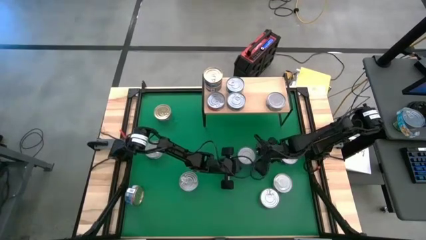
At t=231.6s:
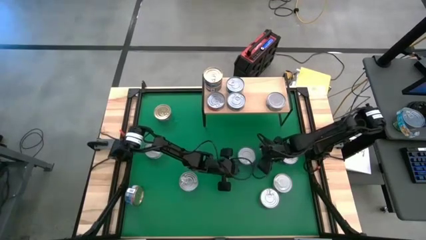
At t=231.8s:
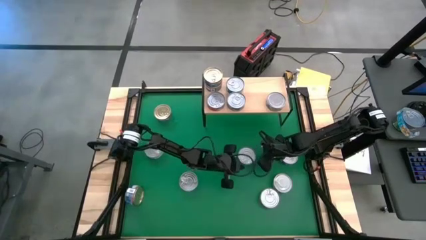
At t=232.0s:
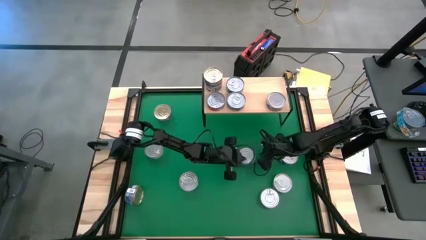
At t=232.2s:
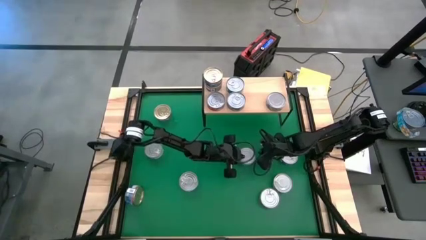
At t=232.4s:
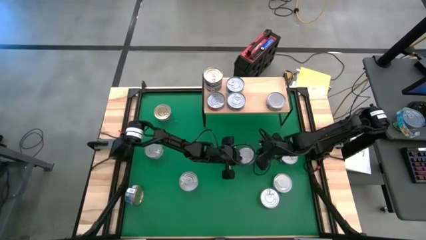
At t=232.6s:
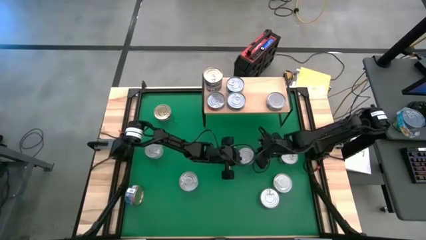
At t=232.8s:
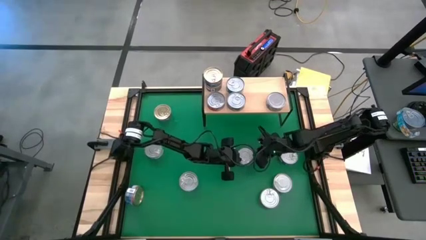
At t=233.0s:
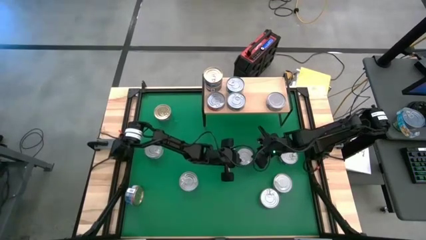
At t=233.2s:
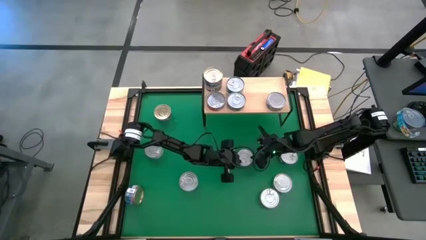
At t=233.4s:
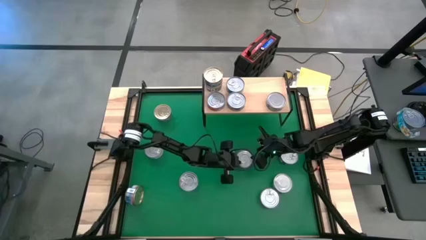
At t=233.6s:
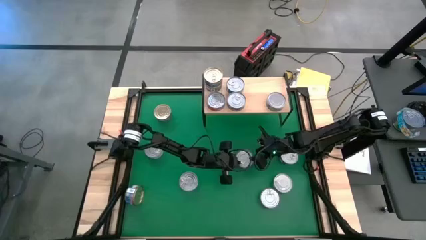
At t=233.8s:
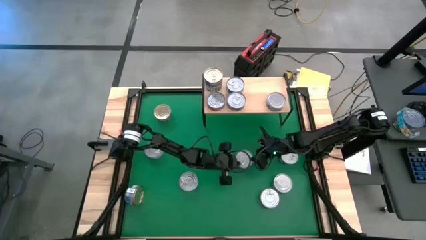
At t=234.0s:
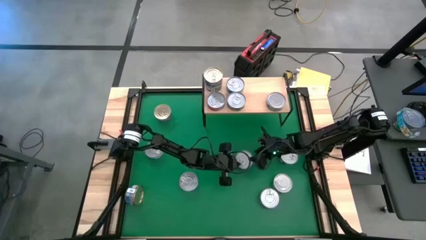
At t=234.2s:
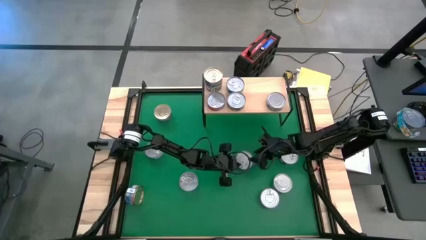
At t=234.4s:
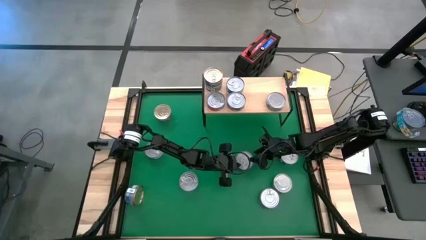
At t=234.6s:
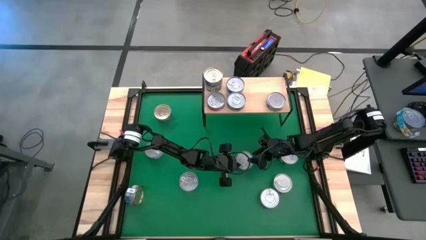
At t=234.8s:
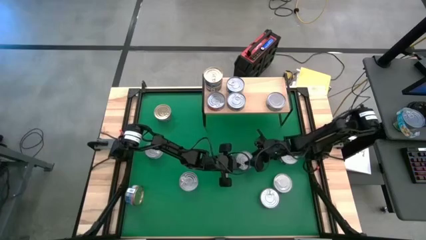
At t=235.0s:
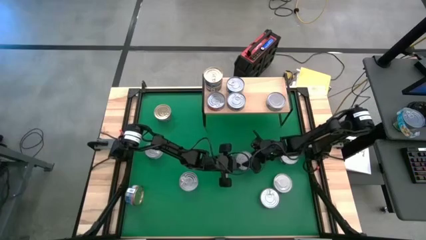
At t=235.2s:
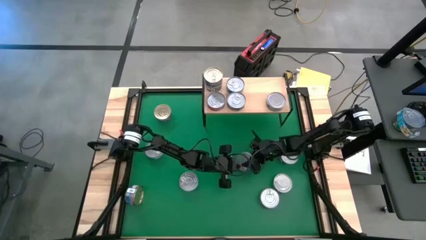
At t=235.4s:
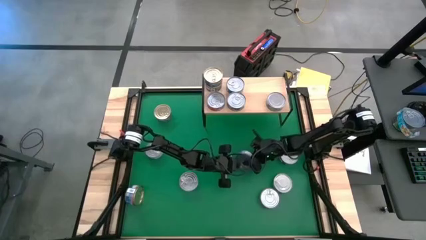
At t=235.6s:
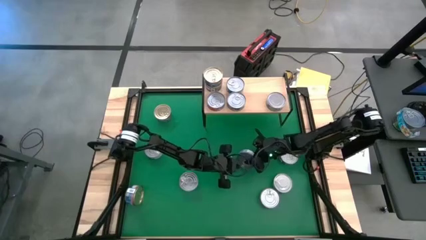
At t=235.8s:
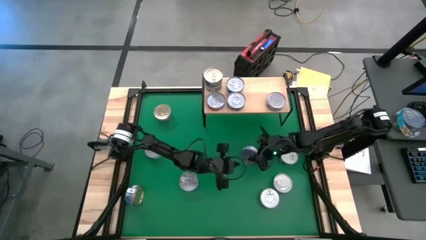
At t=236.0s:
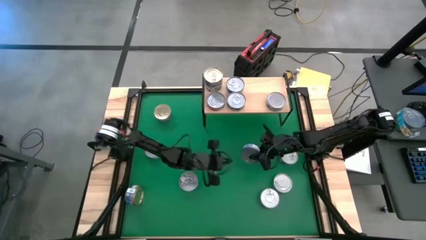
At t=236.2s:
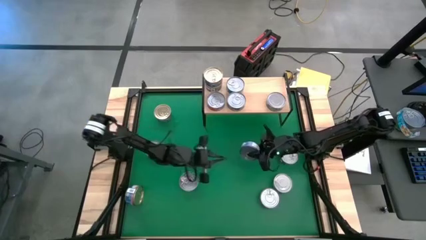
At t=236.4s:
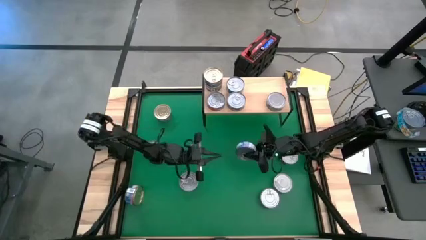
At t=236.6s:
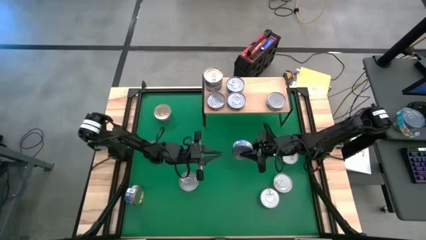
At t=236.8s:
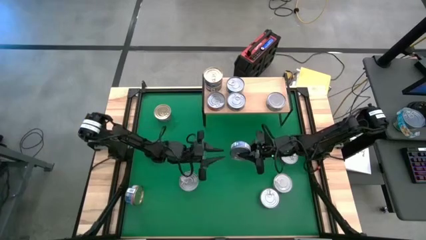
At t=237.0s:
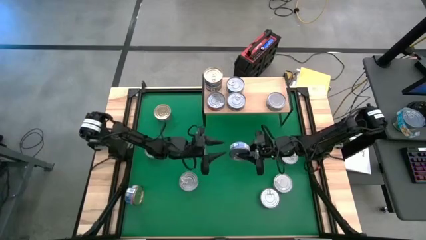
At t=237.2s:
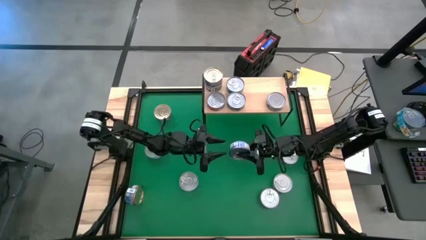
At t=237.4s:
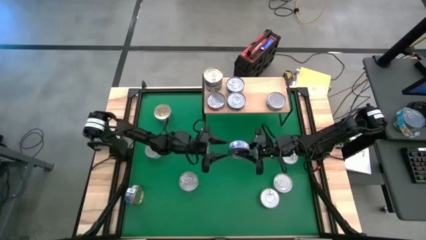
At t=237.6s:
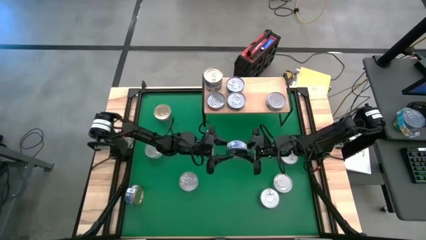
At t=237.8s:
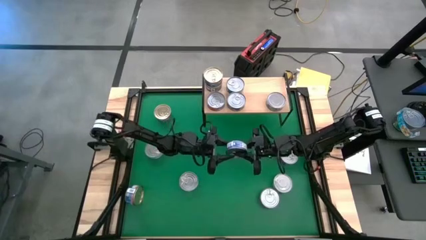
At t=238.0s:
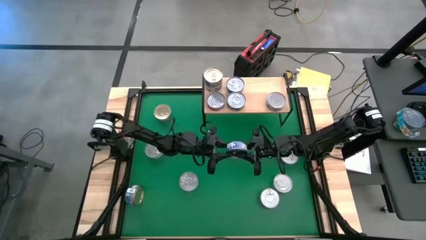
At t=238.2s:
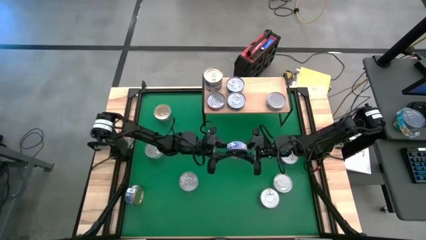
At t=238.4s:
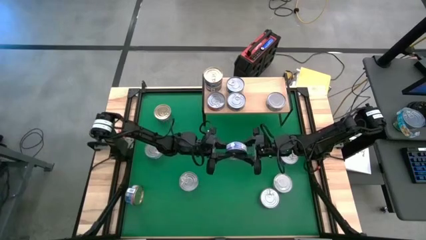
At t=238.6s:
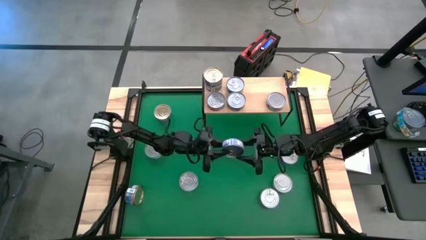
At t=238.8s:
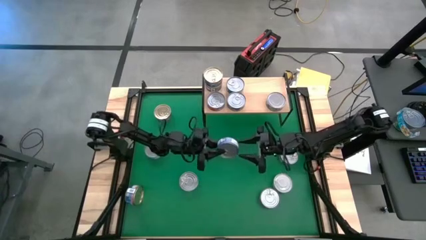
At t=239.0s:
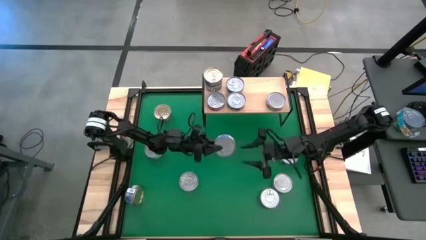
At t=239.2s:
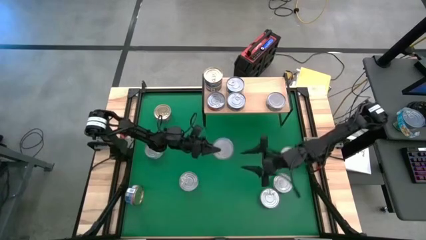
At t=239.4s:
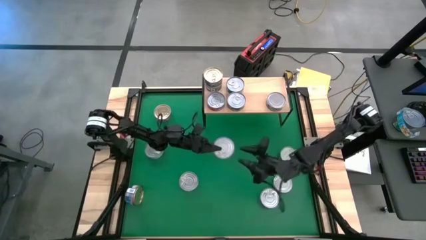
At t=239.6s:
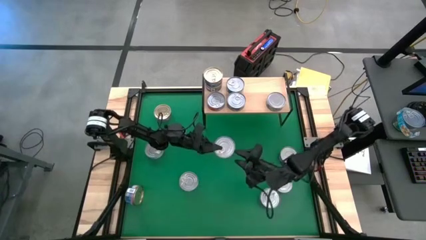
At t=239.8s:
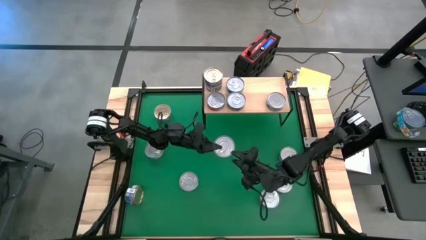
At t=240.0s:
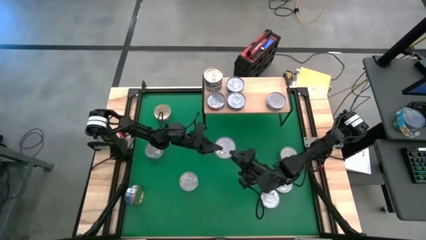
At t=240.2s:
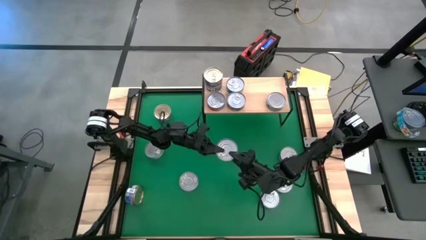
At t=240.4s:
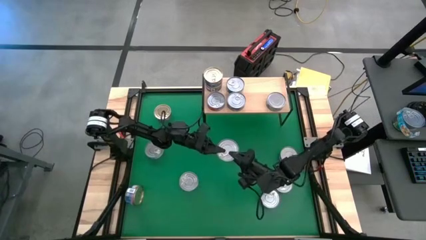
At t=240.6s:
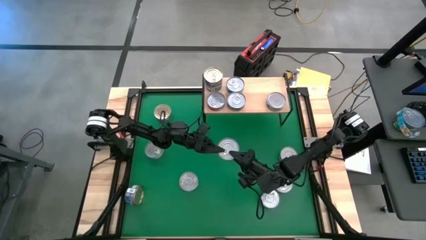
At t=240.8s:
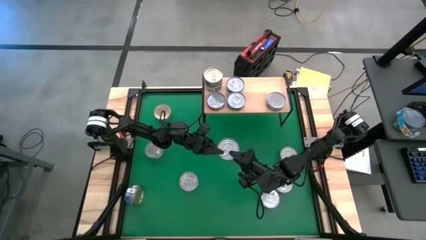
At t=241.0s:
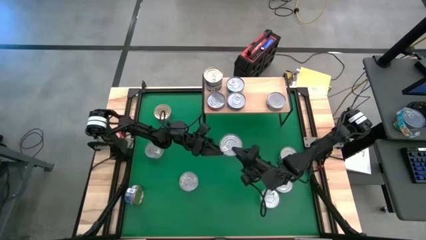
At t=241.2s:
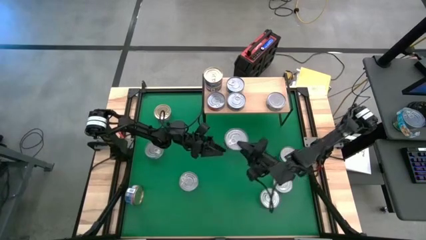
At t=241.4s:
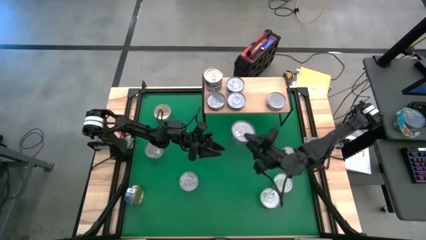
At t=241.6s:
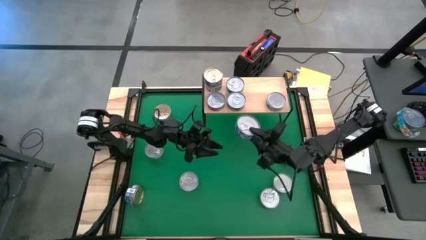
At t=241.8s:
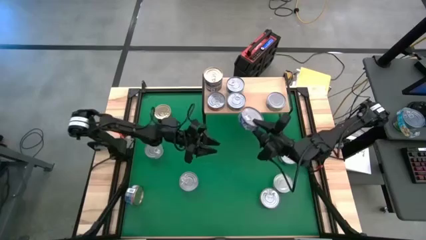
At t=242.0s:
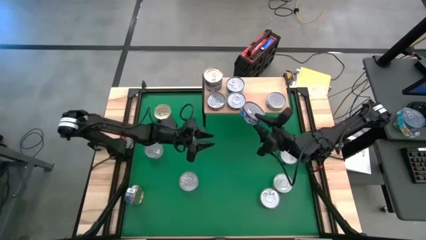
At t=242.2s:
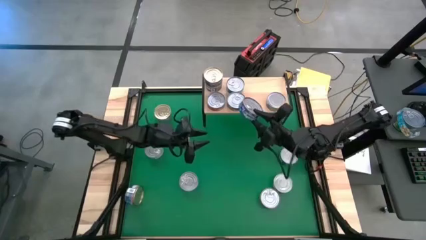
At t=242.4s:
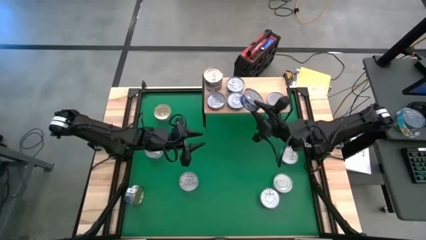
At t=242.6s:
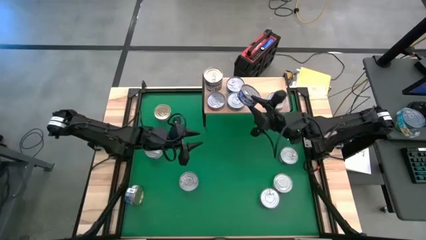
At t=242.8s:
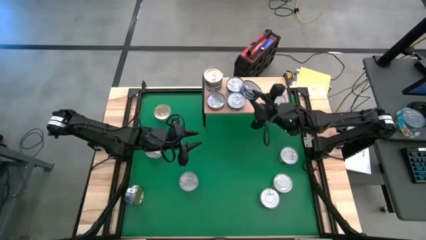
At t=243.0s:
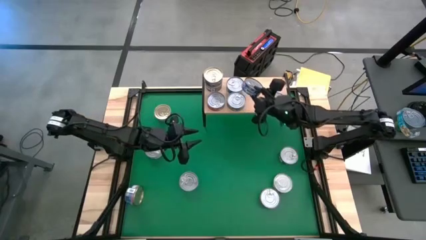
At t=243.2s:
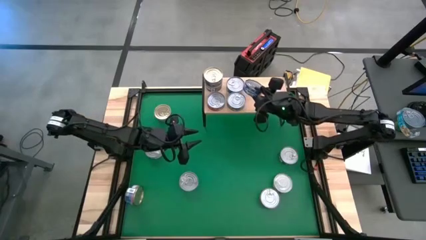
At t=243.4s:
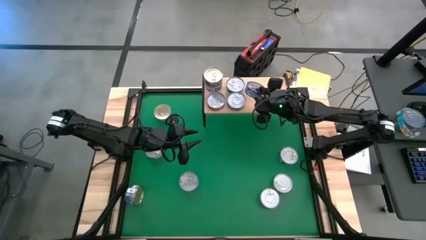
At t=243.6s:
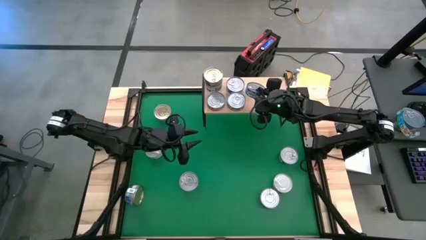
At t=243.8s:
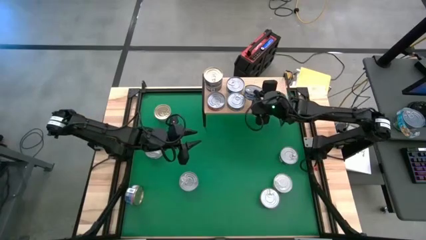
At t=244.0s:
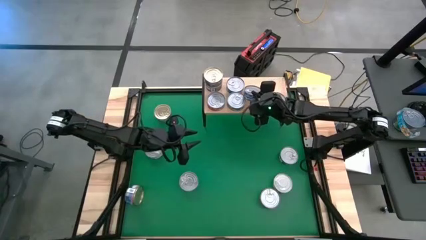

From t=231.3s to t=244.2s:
Task: Stack canned seafood by type on shelf
Put the blue tuna can on the shelf
